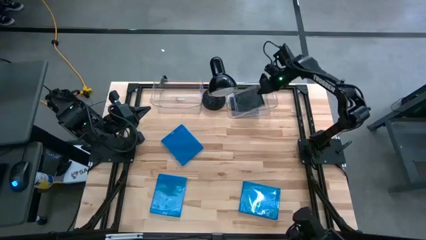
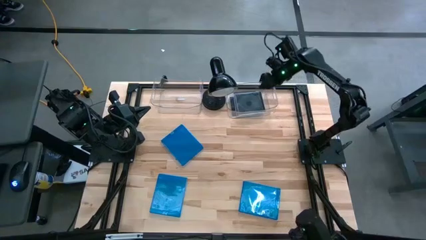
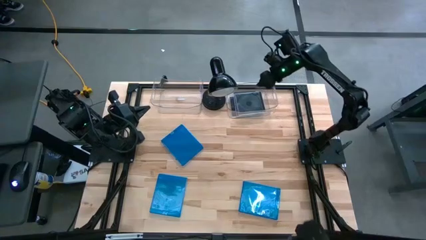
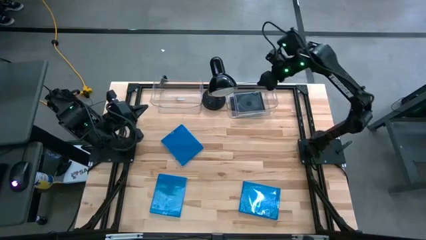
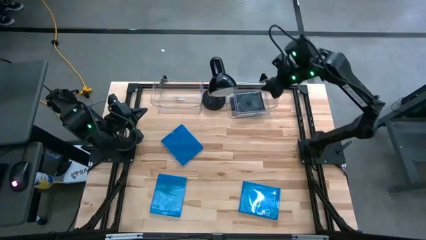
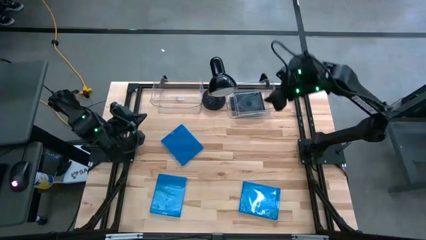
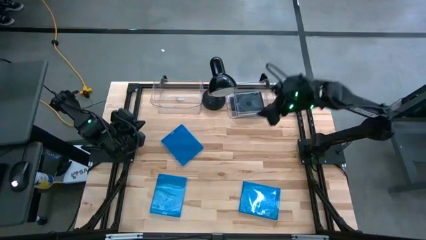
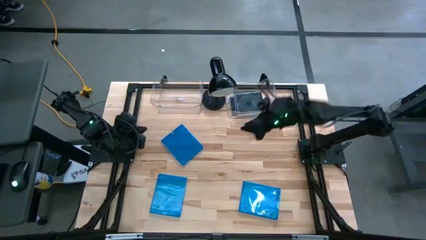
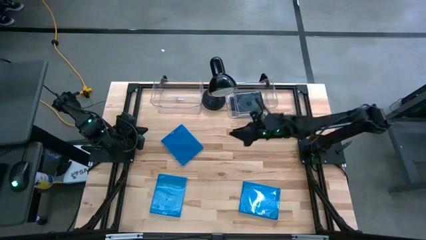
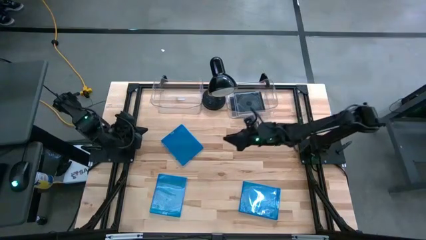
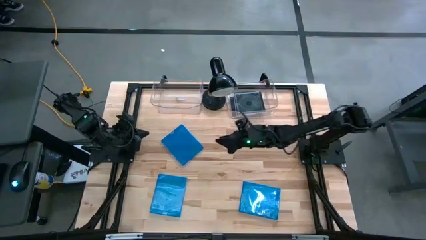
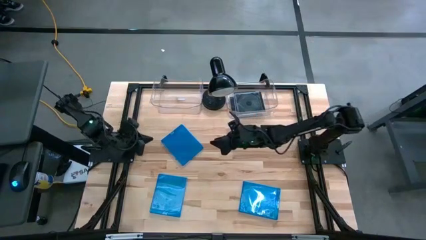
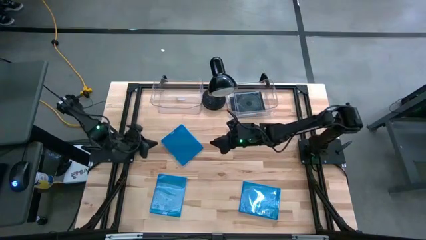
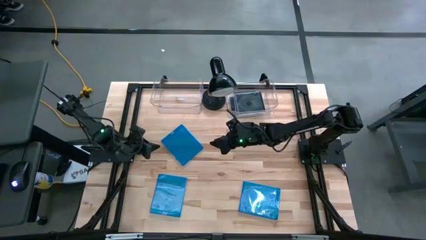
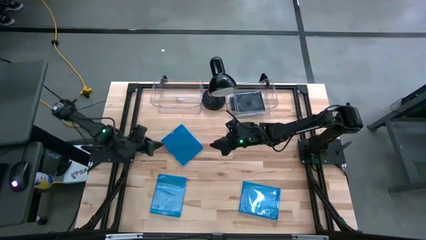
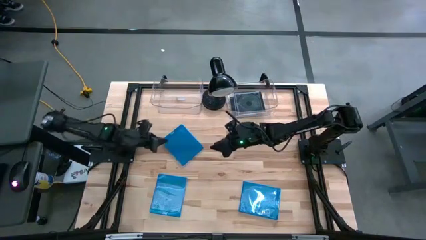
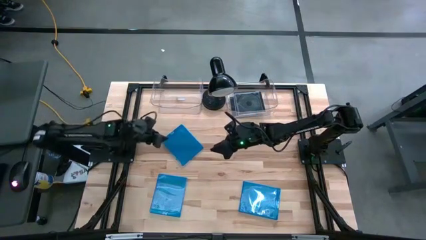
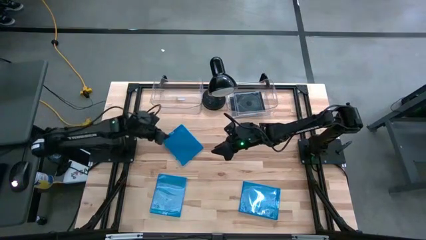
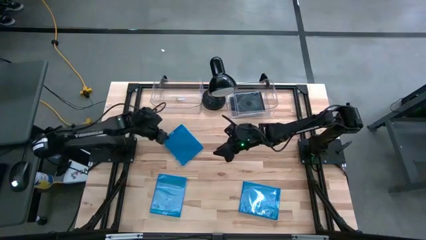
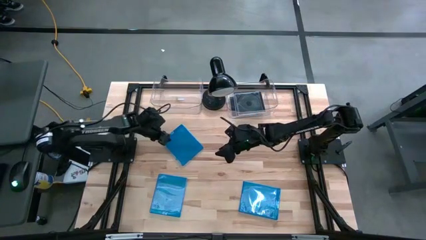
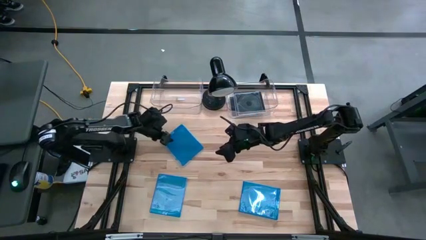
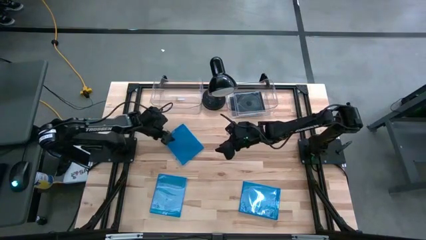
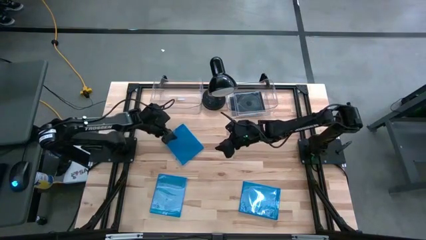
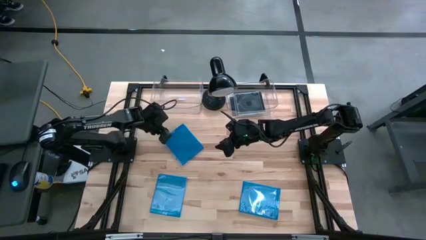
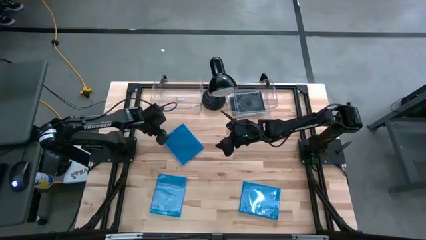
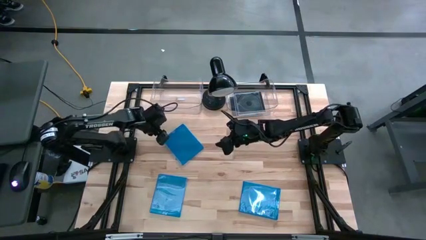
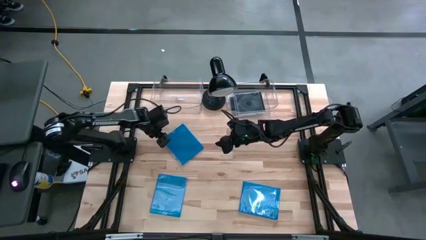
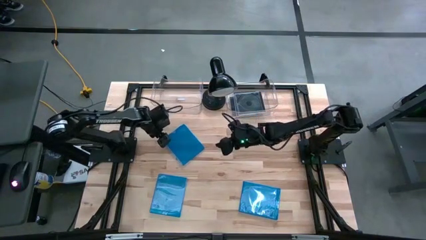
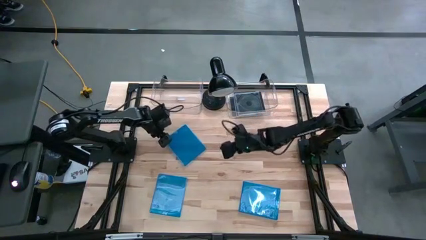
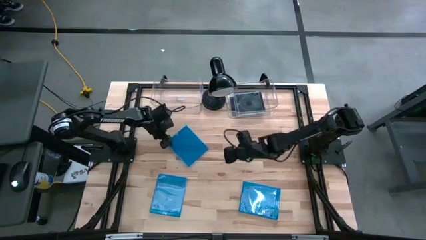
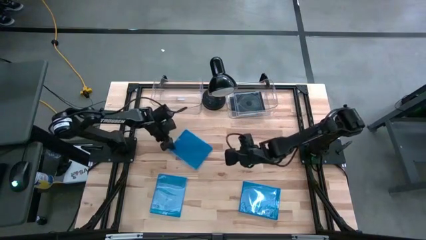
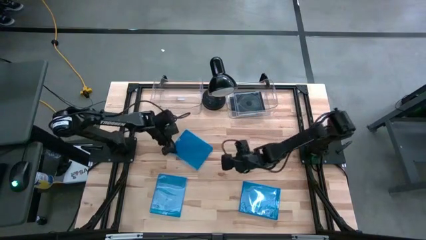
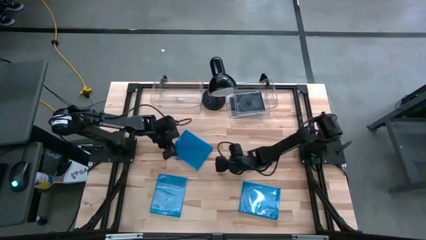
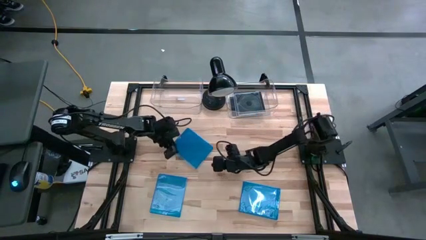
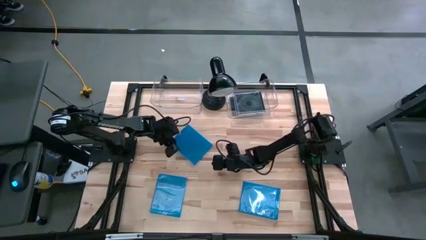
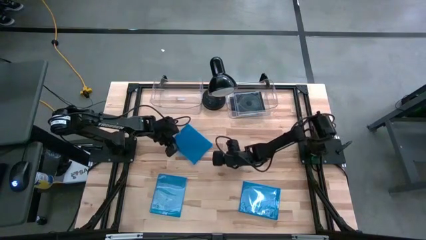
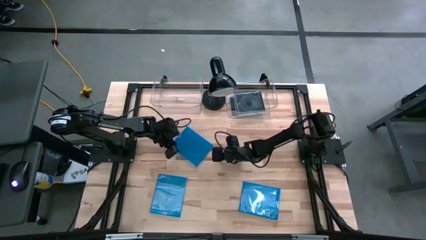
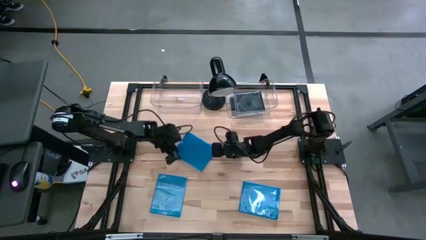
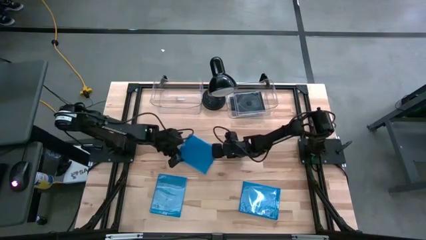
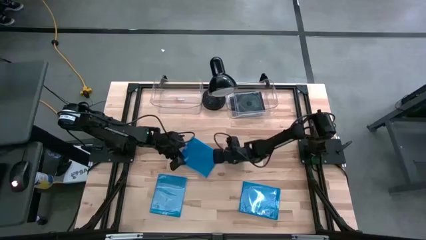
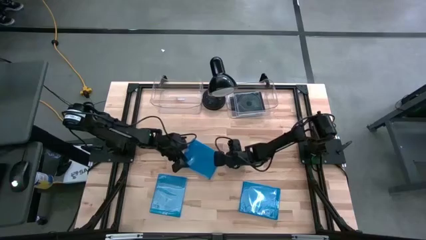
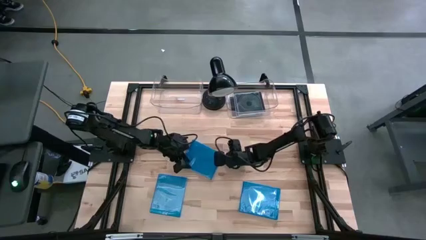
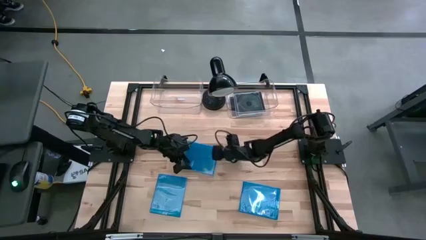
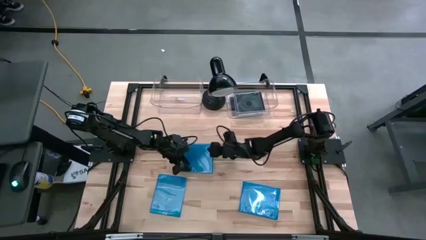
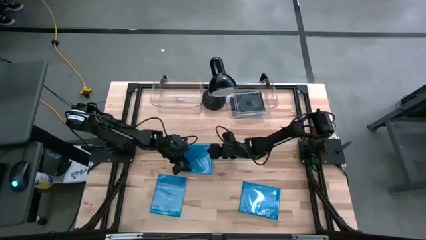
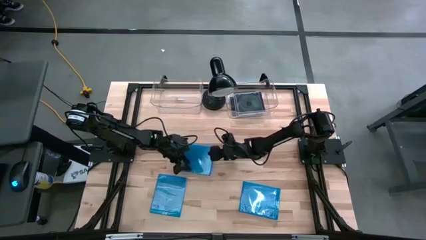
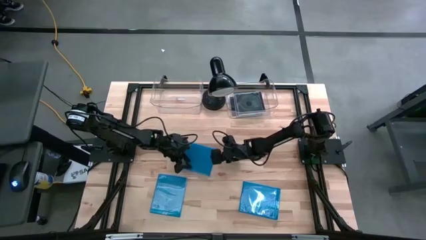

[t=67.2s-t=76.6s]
Task: Pick & place jewel cases by type
Put the top left blue CD case into the left transparent bin

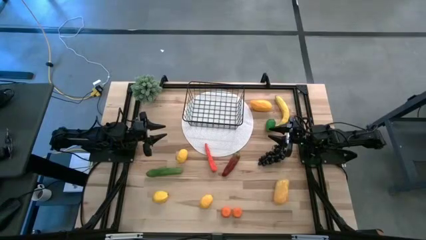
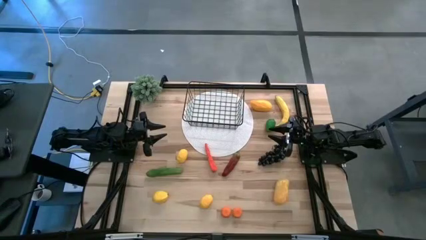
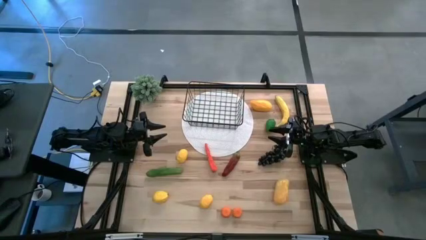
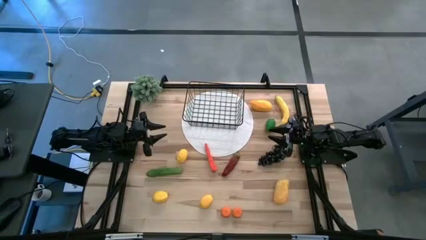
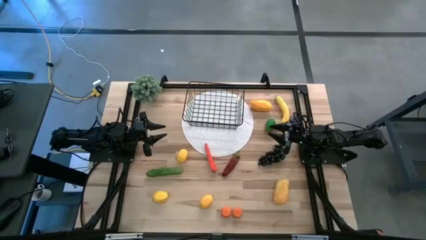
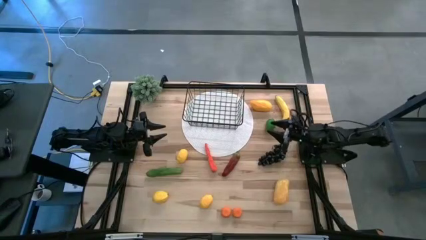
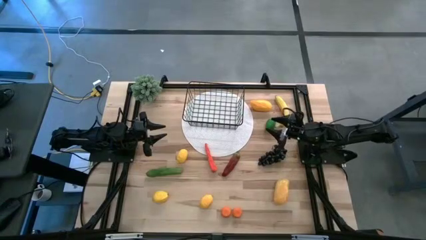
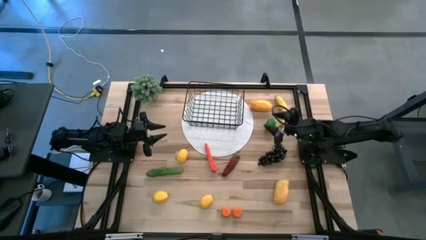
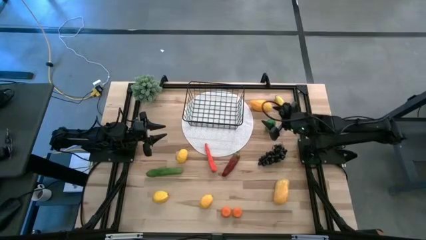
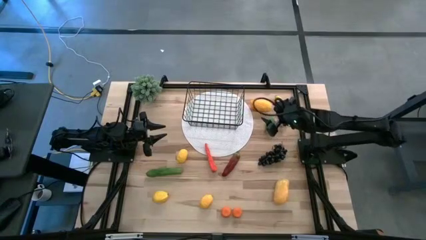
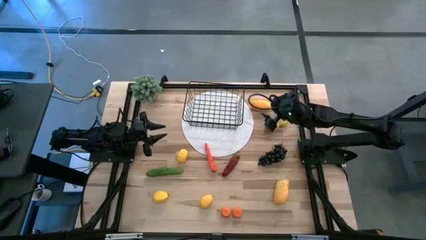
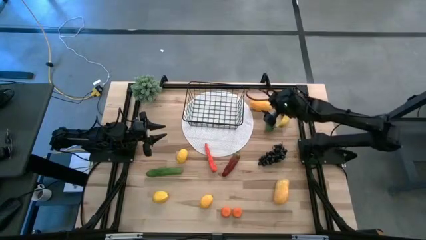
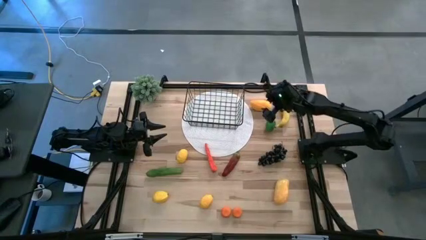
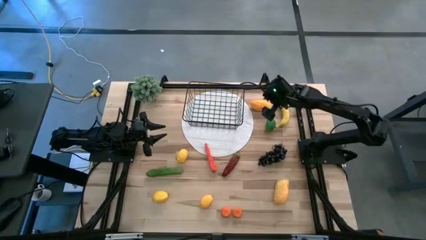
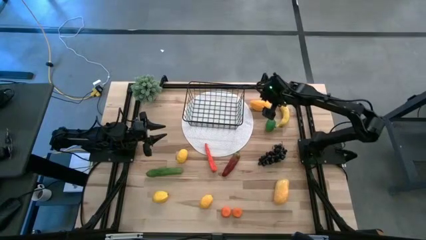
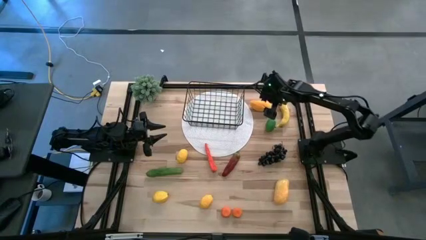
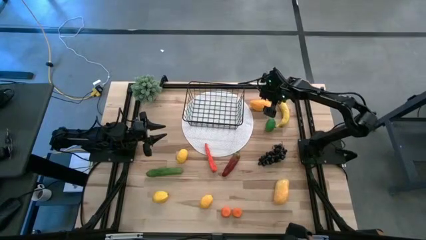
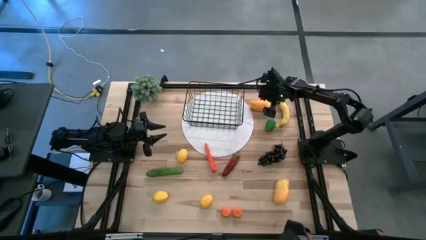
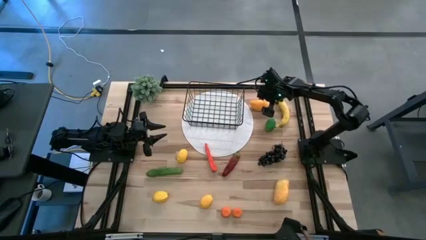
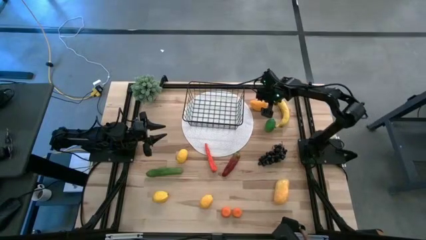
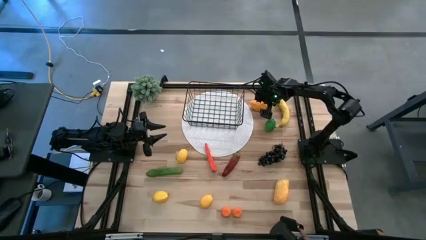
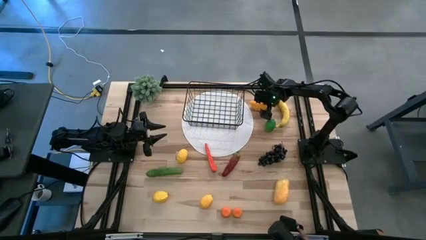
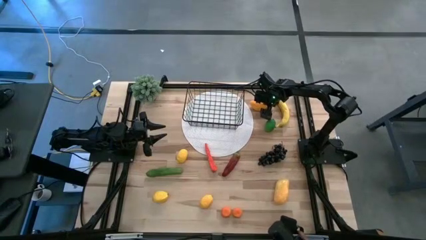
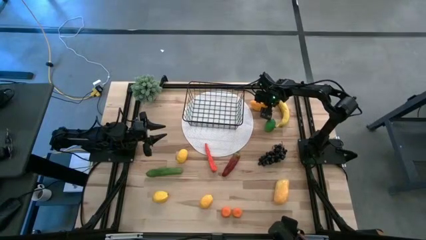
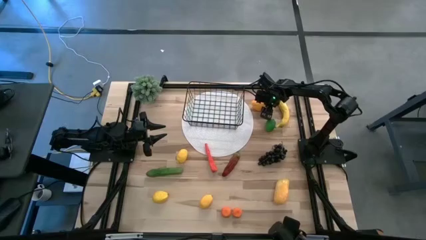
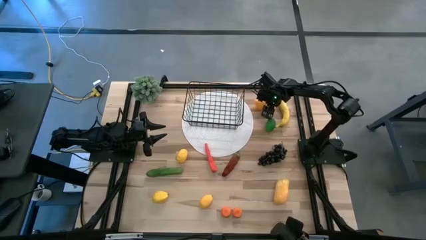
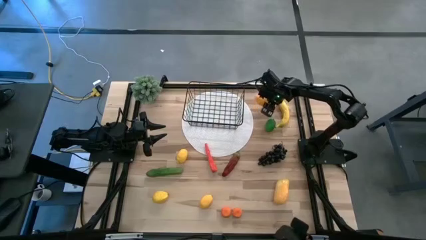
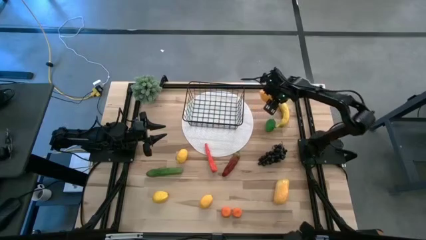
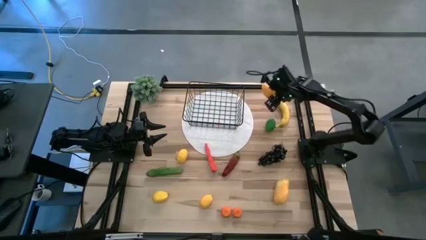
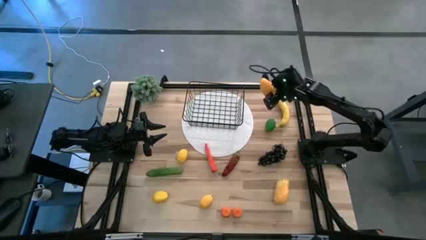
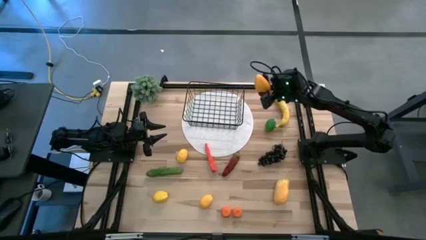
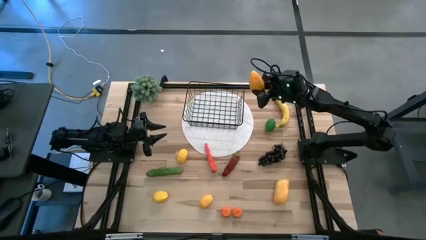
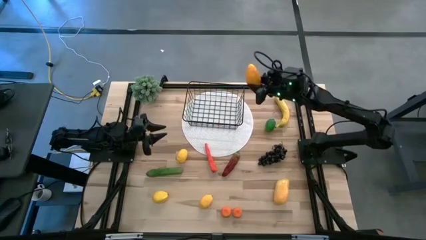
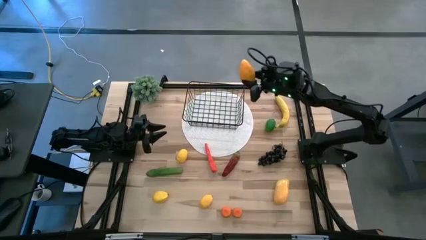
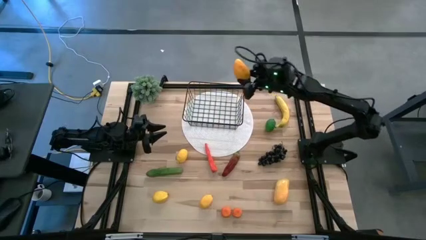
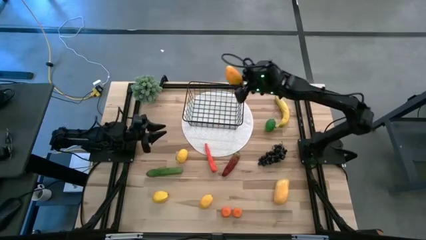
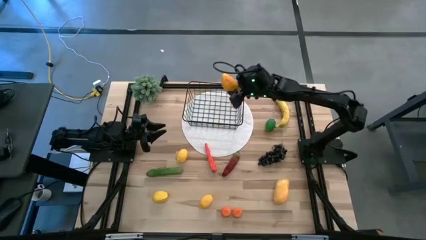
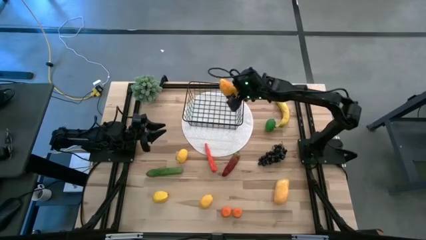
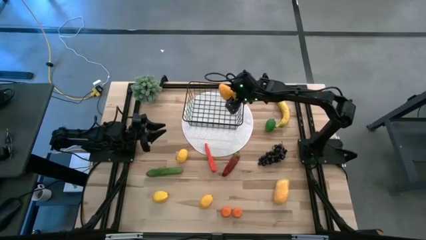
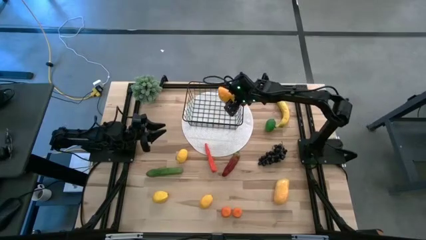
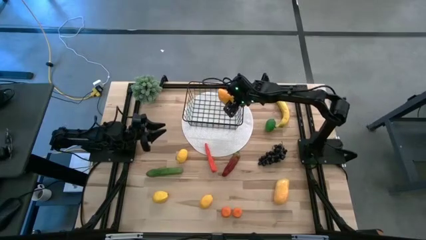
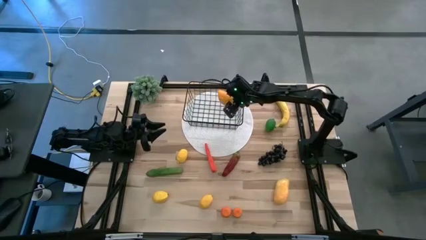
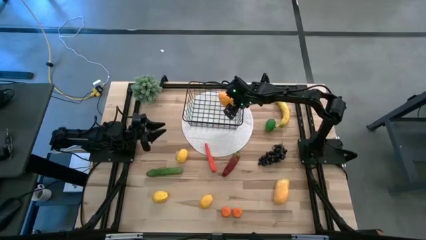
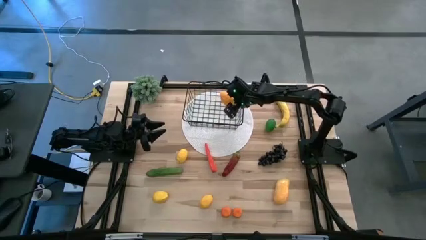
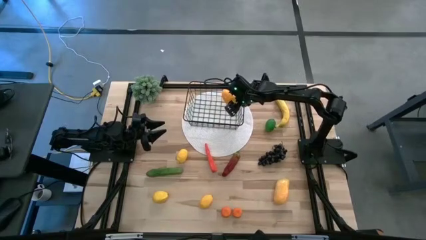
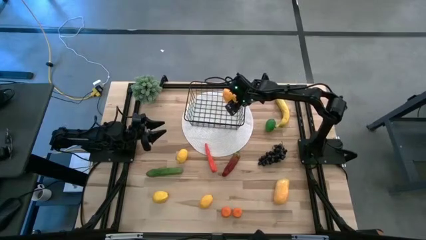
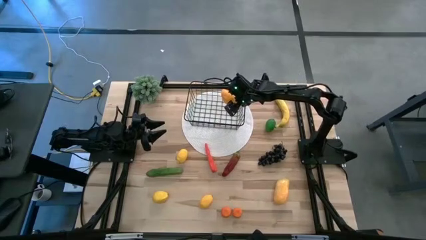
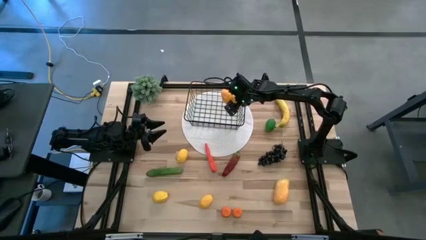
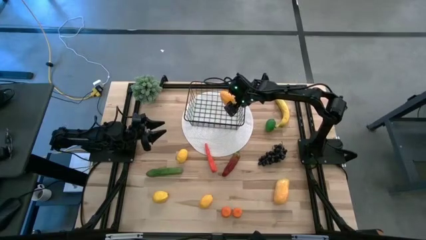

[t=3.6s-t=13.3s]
Task: Build produce basket
Put the top mango into the wire basket
